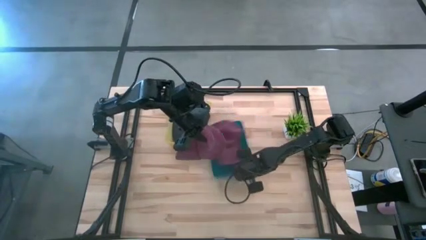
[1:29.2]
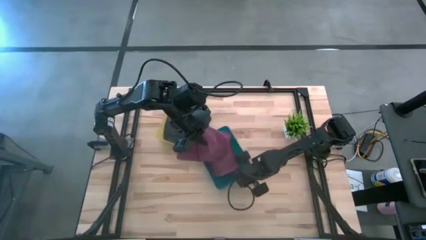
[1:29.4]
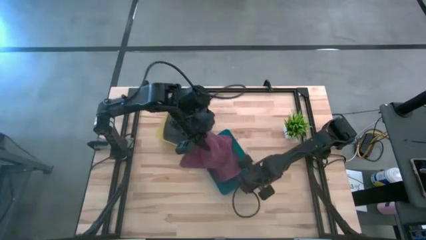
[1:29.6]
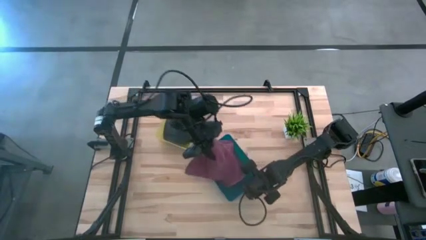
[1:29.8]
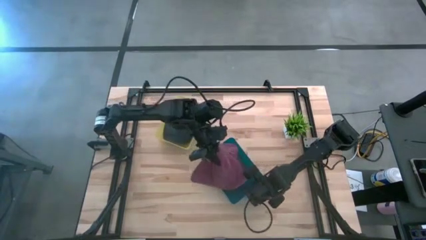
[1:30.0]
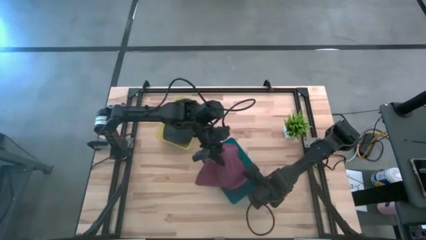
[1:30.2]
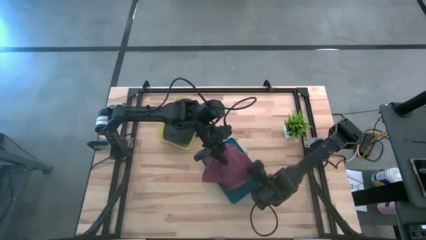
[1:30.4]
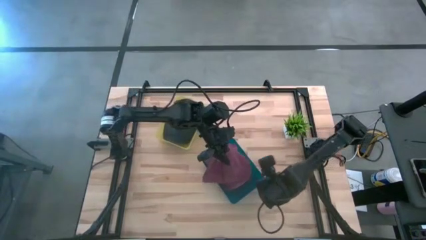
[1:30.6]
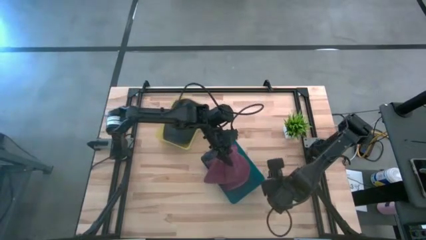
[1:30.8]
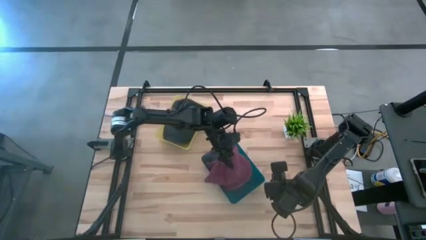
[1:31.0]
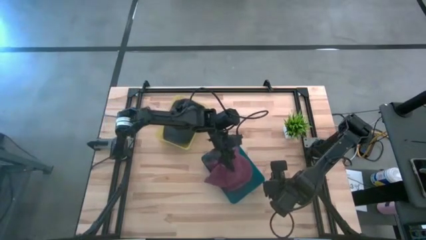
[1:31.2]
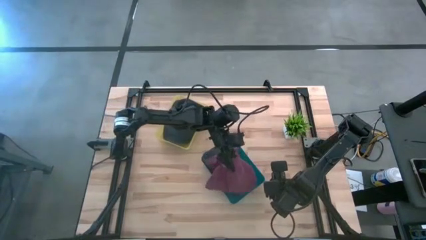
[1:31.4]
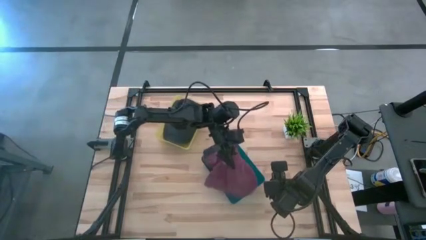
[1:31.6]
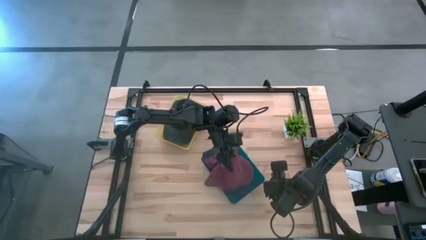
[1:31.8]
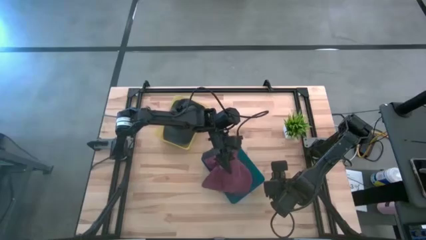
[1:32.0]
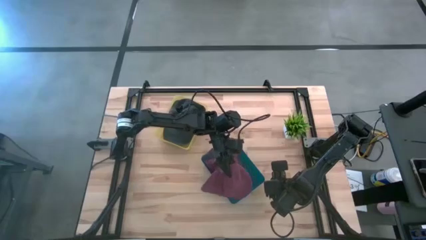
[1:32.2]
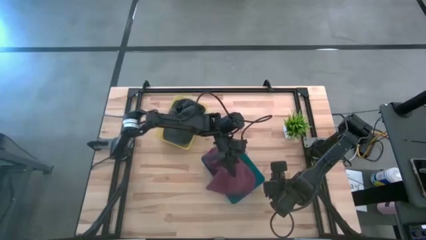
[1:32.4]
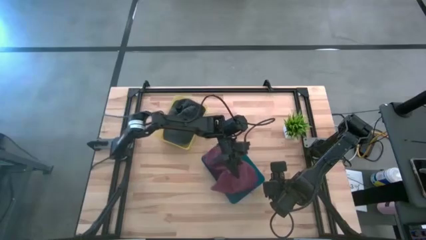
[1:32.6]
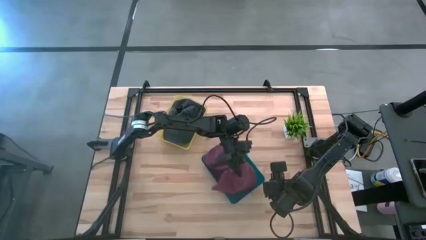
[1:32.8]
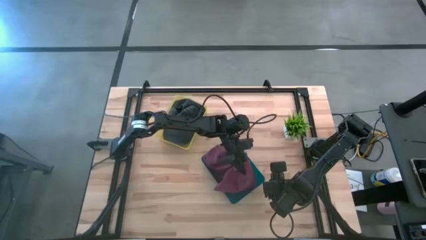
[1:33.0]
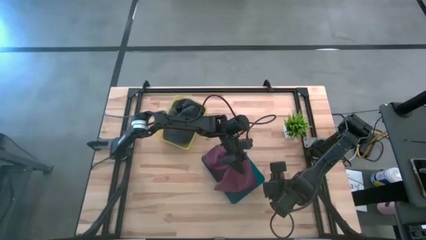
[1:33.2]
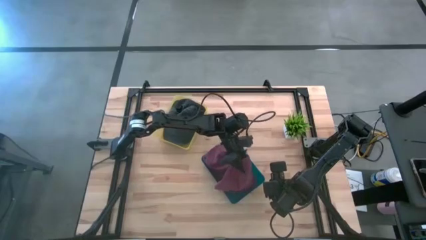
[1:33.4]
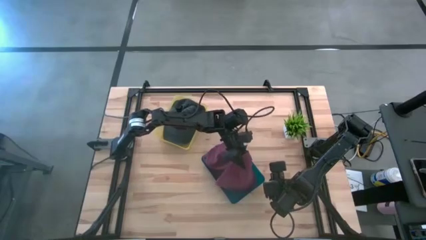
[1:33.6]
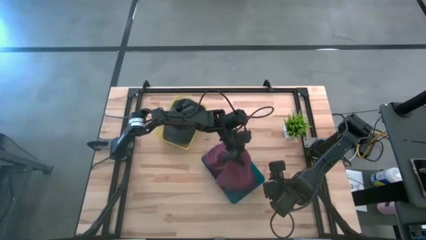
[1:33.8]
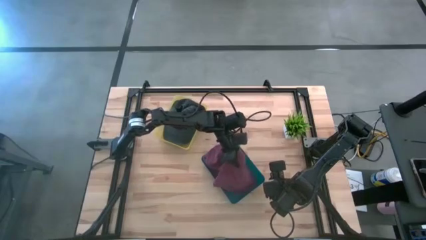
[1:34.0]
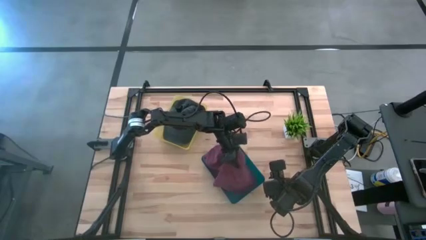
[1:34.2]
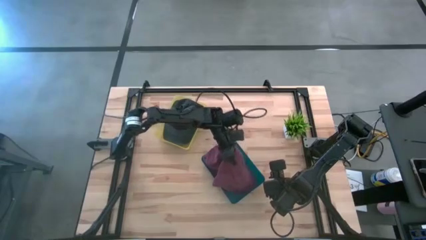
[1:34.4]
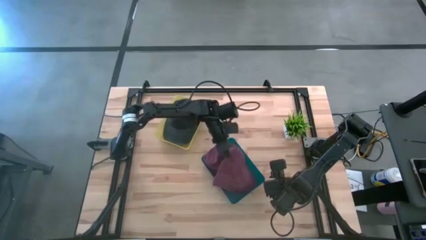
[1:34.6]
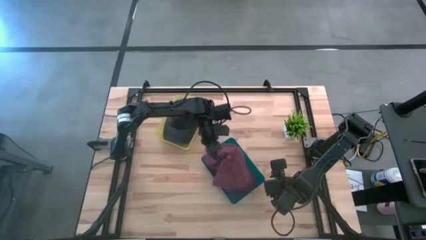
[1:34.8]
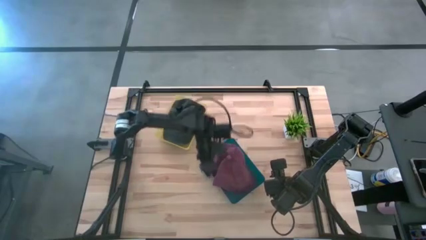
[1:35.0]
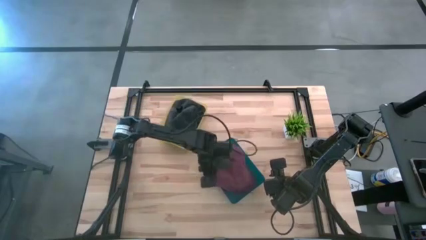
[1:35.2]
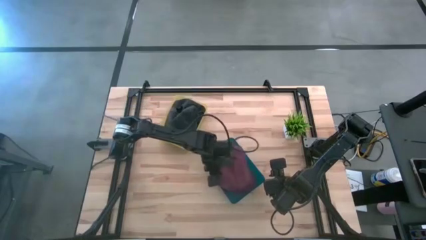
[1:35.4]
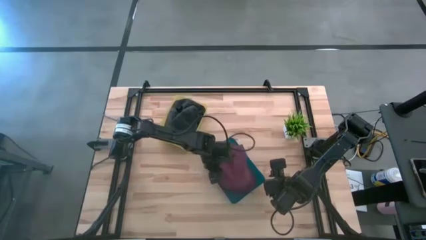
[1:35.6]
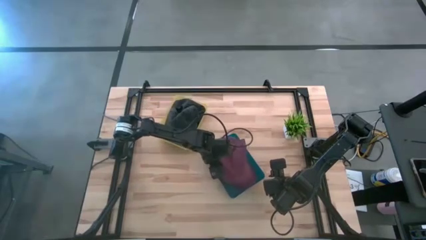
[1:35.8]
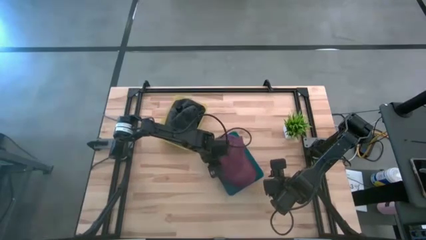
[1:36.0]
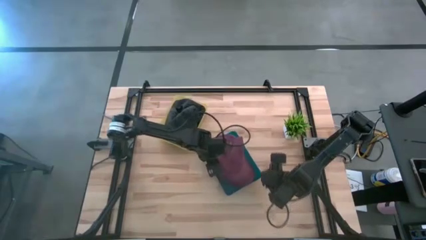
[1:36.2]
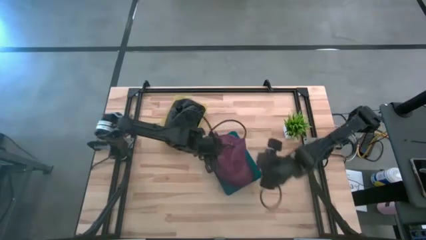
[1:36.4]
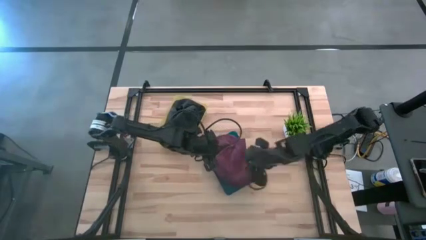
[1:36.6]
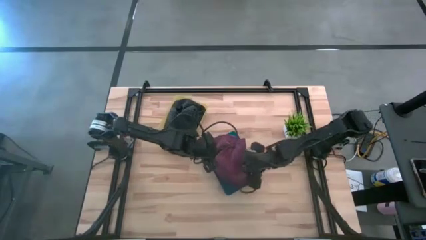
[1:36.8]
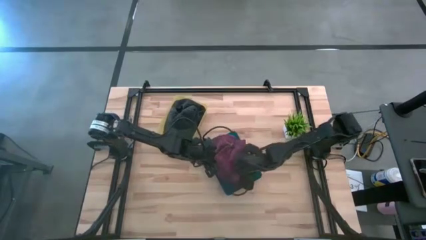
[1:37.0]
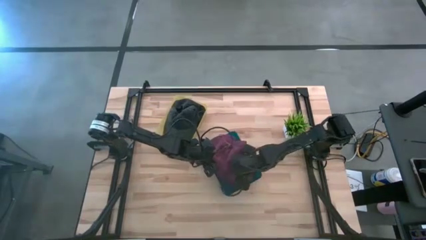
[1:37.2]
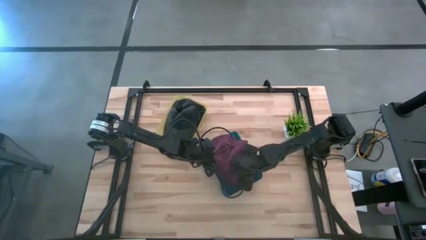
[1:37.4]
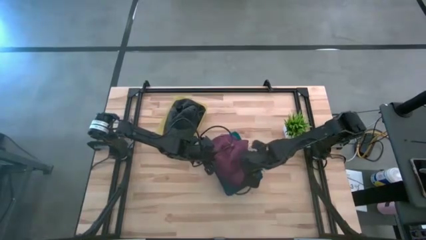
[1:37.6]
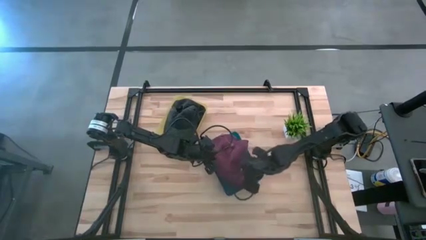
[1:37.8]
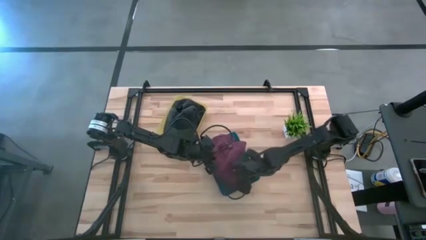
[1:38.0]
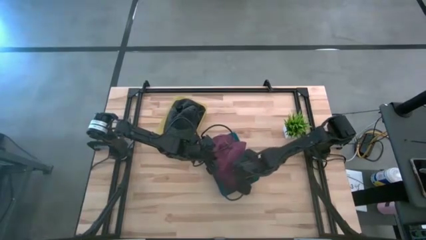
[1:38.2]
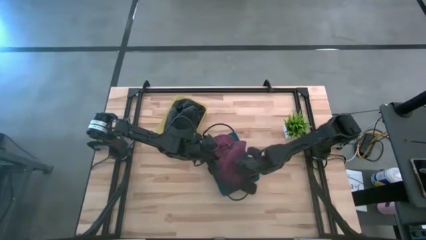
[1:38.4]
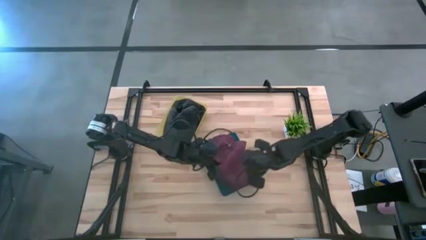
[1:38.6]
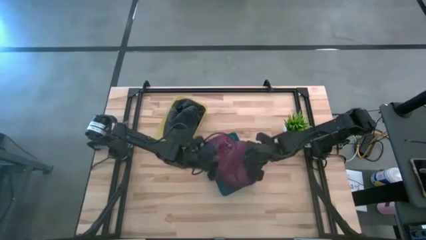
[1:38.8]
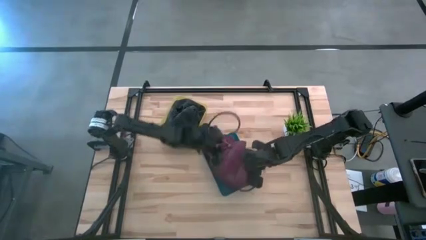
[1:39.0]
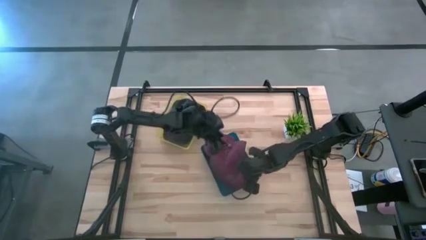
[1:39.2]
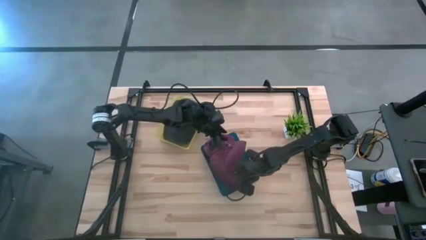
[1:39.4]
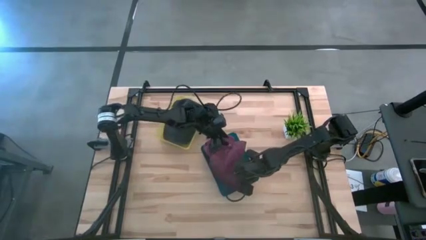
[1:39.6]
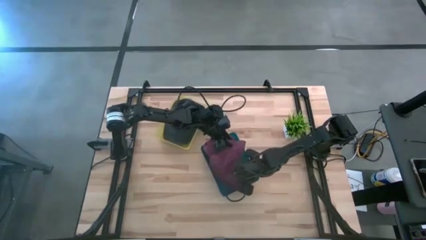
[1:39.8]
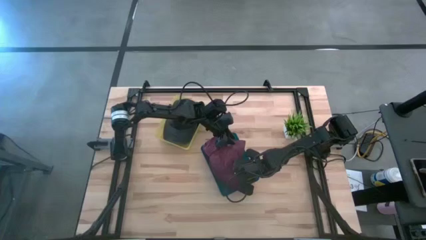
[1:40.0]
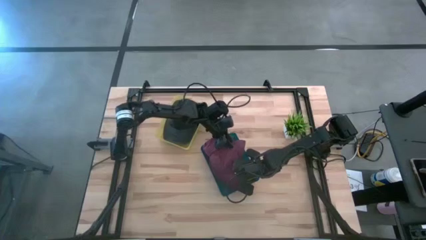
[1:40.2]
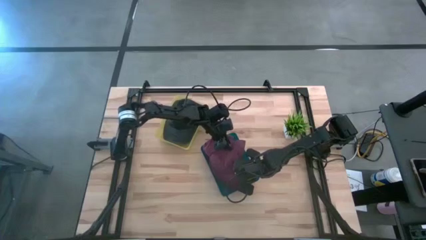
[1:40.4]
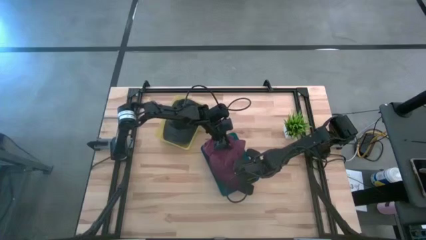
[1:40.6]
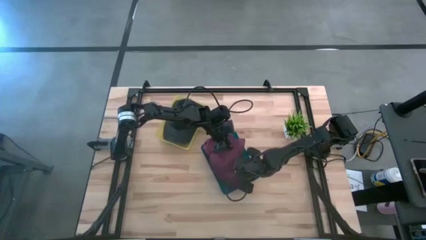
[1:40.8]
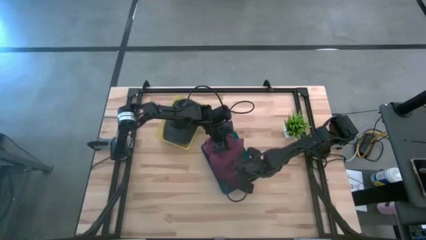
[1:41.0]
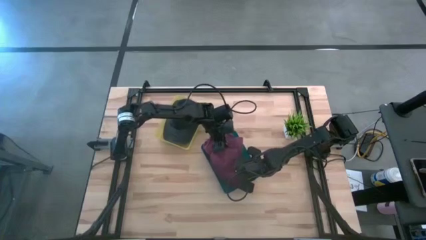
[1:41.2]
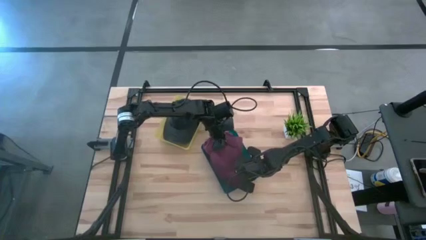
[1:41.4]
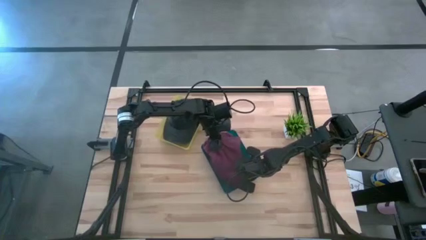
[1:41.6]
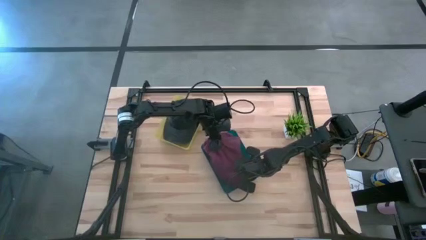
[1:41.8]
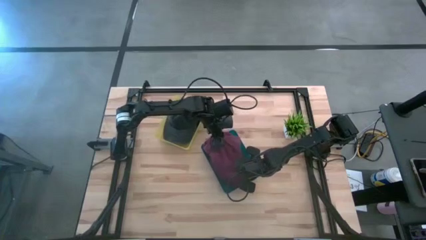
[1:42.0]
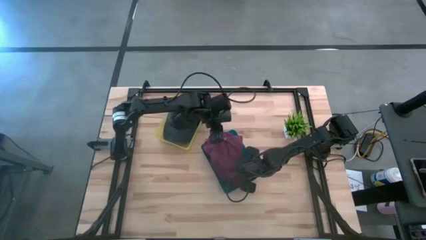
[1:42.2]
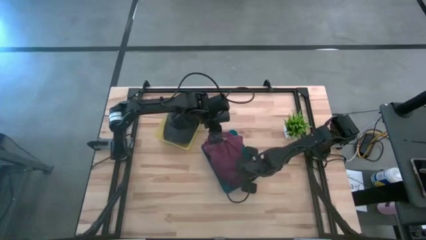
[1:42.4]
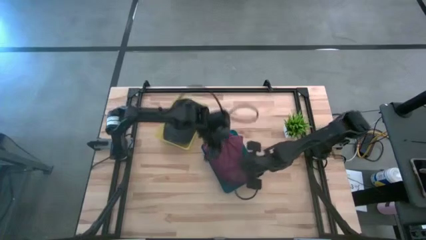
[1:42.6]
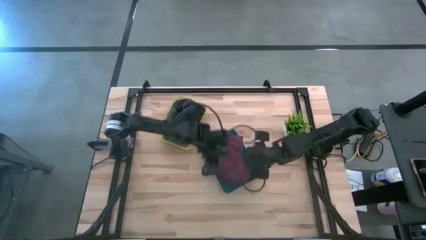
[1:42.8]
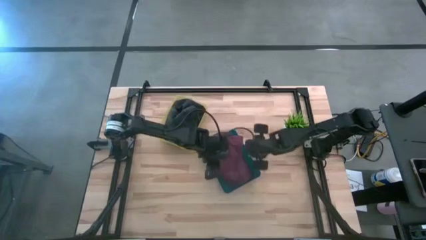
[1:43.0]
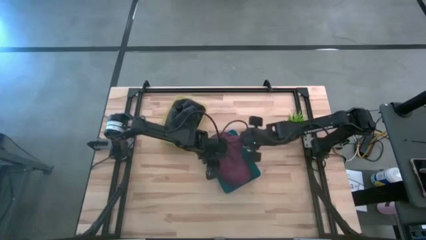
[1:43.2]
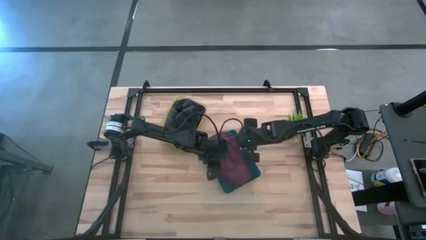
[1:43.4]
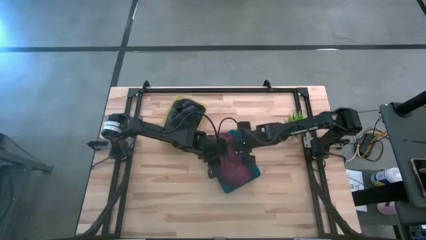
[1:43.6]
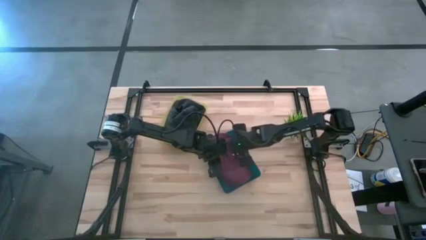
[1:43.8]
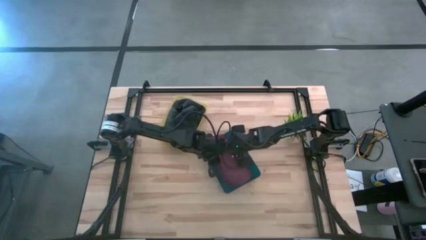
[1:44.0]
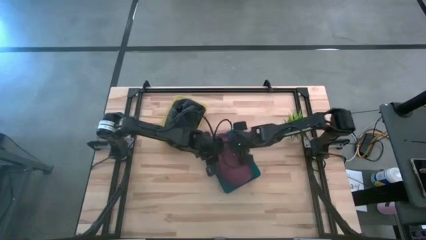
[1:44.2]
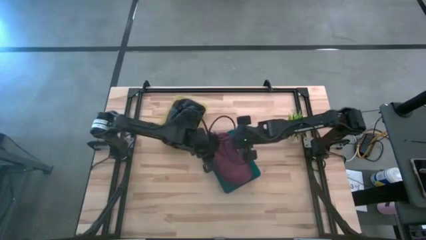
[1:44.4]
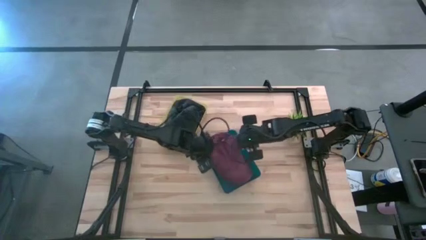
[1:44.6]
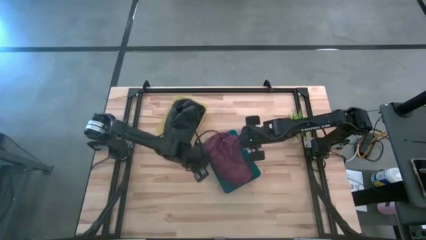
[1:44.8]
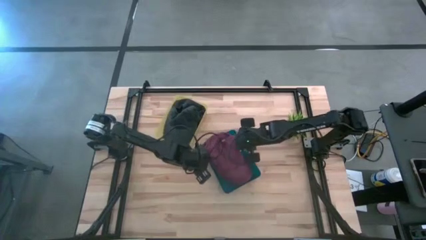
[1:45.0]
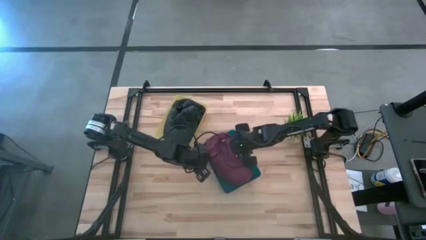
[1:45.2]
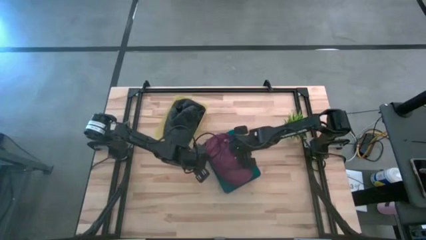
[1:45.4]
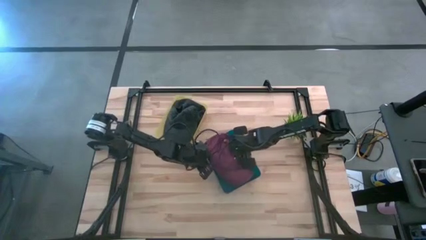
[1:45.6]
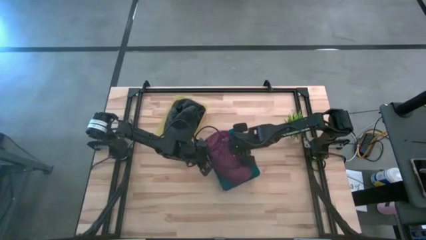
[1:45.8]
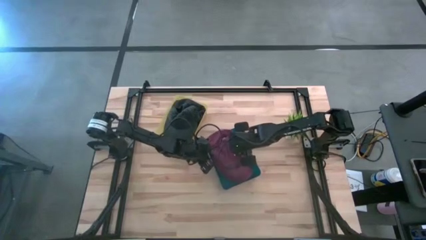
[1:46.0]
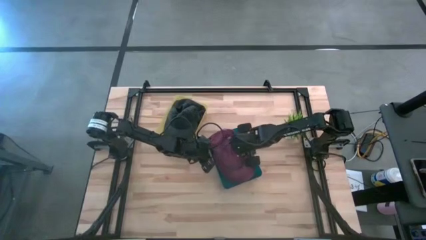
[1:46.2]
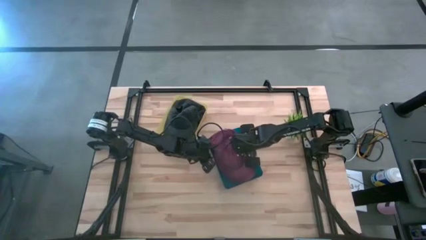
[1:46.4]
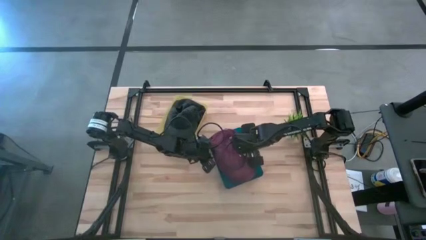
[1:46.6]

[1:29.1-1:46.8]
Task: Pick & Place hat
Put the red cap into the blue bin
